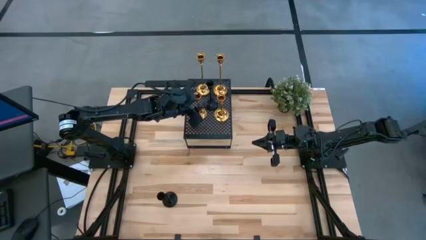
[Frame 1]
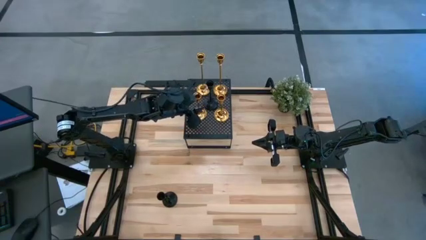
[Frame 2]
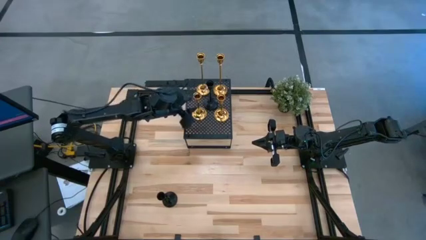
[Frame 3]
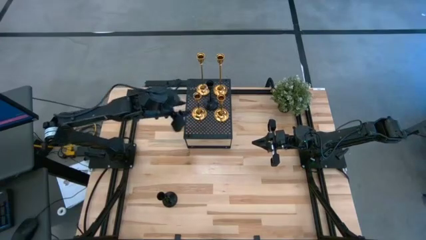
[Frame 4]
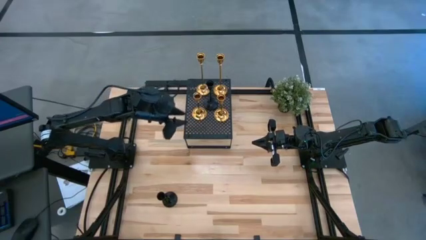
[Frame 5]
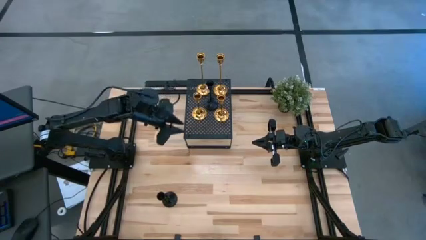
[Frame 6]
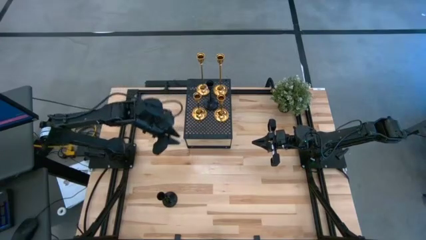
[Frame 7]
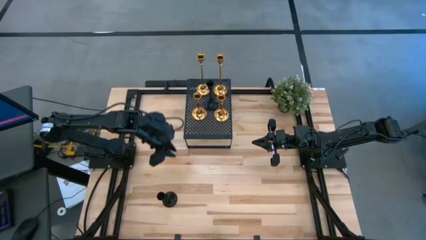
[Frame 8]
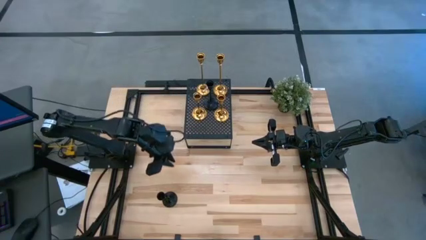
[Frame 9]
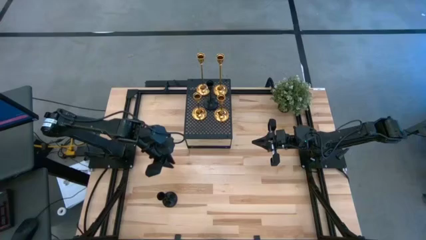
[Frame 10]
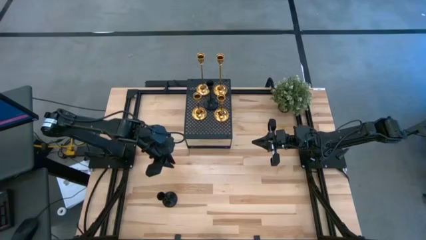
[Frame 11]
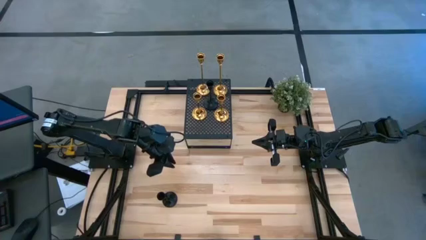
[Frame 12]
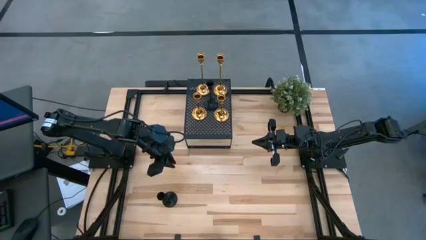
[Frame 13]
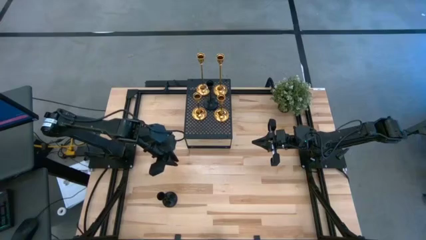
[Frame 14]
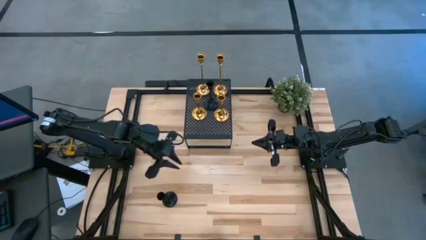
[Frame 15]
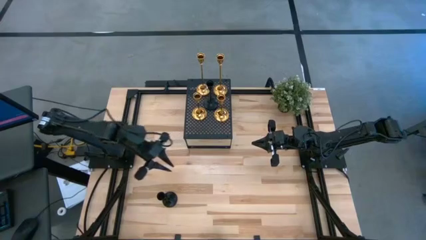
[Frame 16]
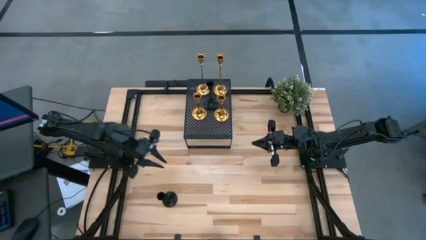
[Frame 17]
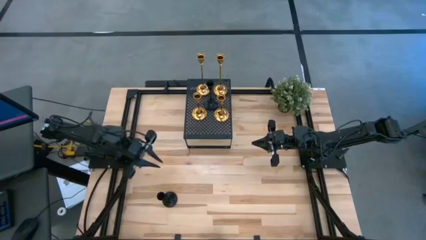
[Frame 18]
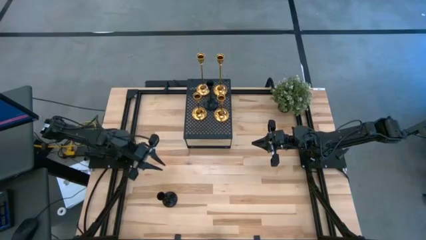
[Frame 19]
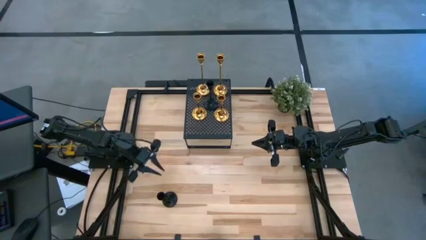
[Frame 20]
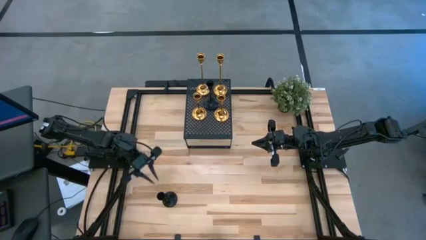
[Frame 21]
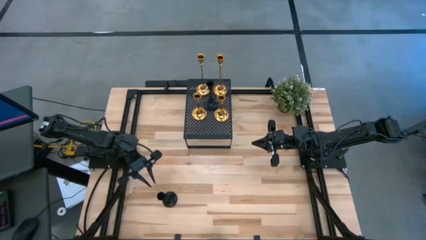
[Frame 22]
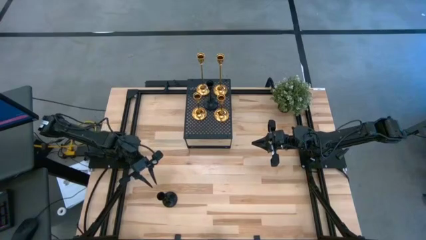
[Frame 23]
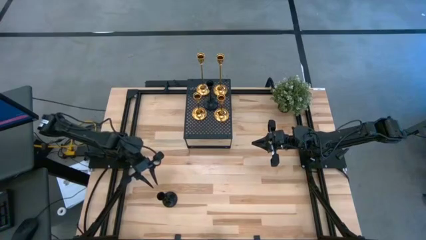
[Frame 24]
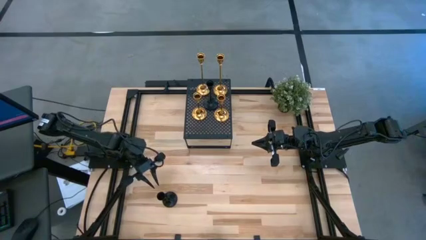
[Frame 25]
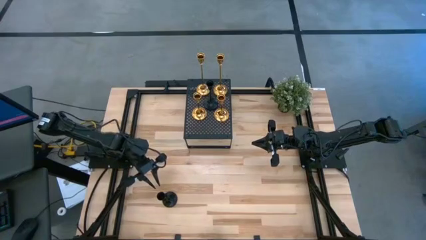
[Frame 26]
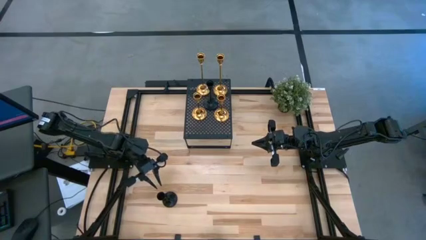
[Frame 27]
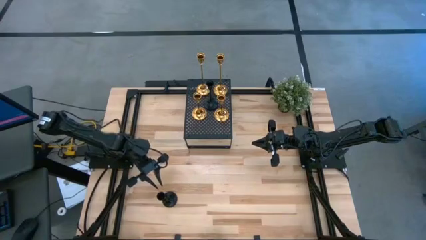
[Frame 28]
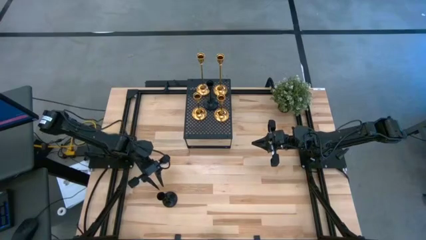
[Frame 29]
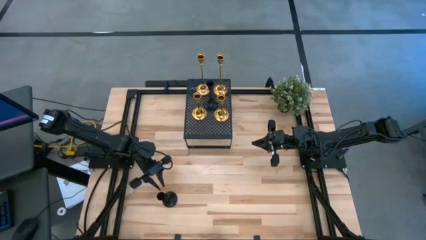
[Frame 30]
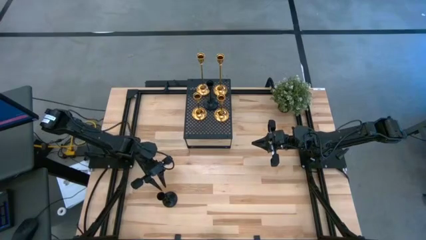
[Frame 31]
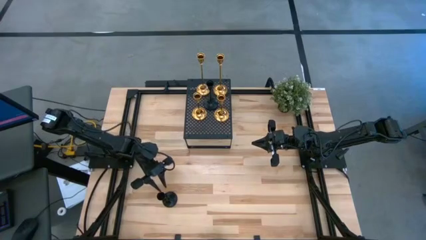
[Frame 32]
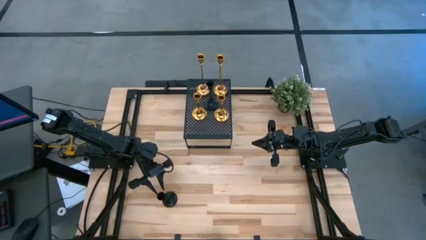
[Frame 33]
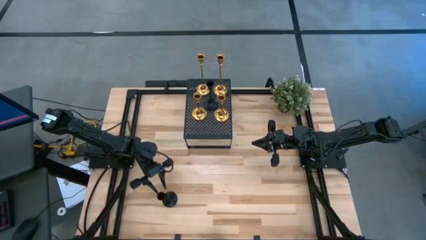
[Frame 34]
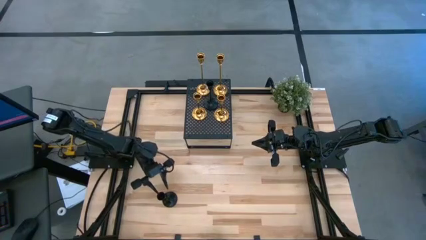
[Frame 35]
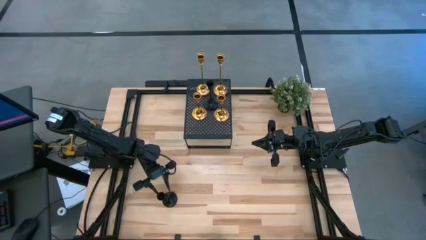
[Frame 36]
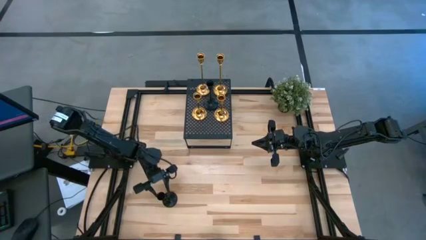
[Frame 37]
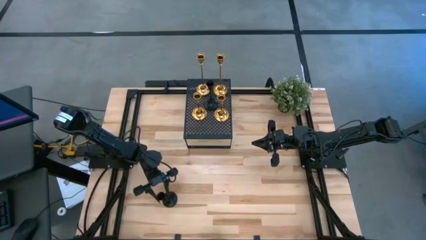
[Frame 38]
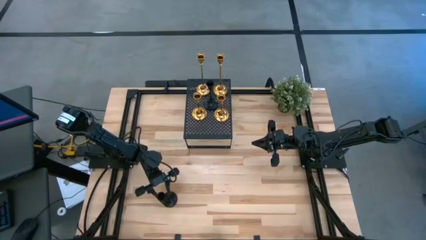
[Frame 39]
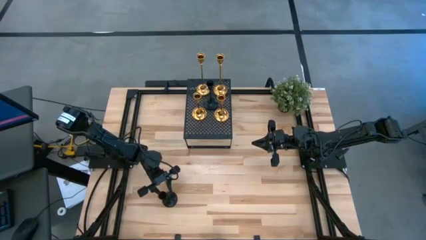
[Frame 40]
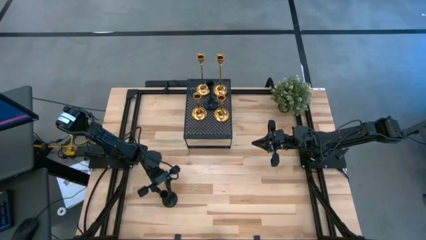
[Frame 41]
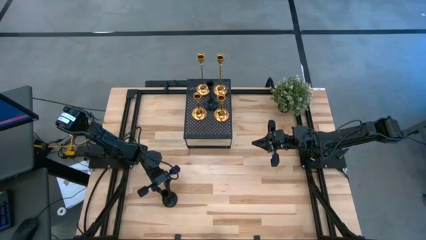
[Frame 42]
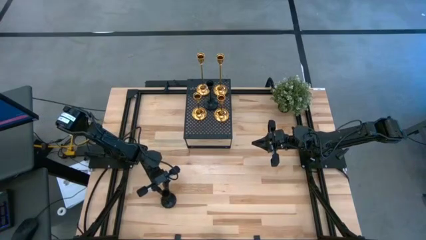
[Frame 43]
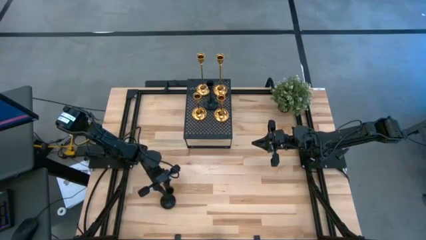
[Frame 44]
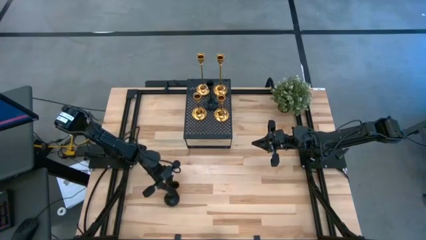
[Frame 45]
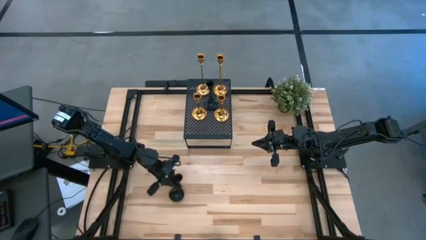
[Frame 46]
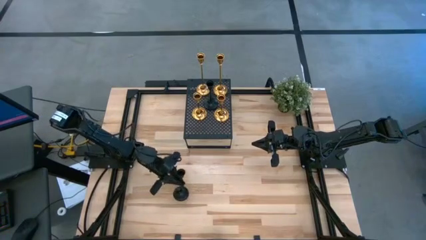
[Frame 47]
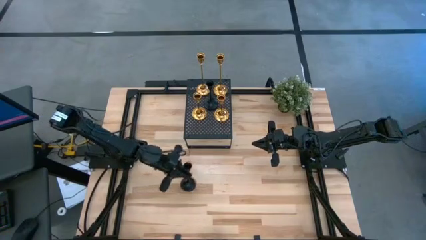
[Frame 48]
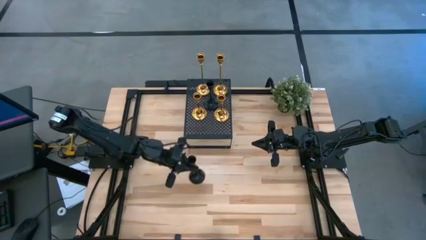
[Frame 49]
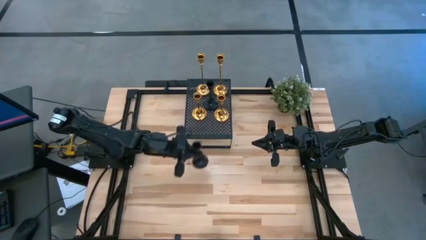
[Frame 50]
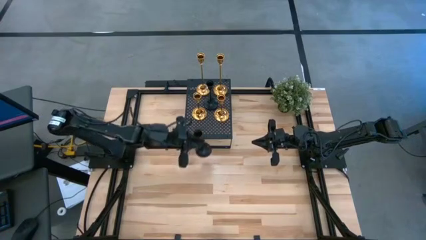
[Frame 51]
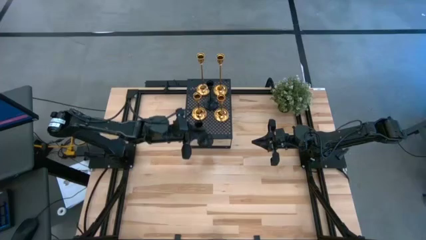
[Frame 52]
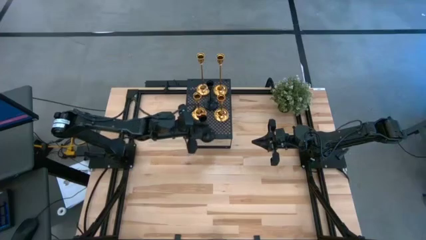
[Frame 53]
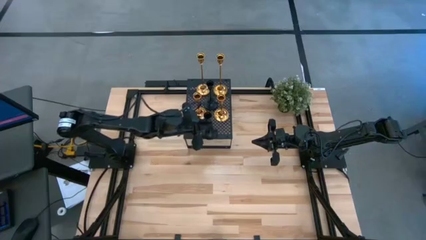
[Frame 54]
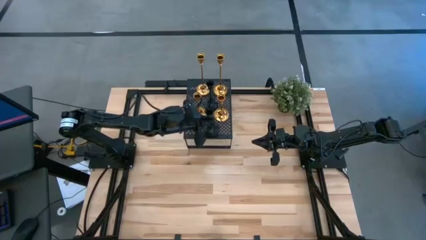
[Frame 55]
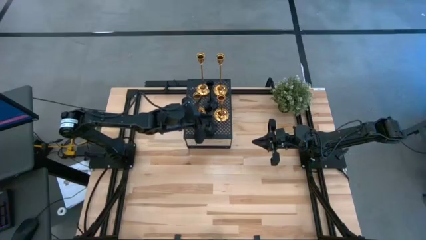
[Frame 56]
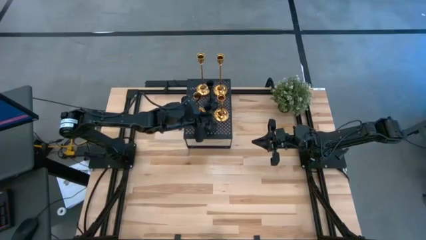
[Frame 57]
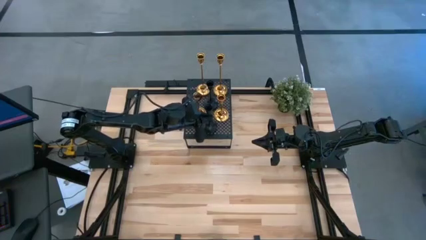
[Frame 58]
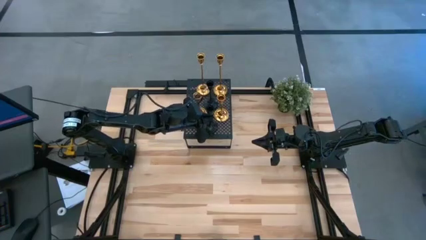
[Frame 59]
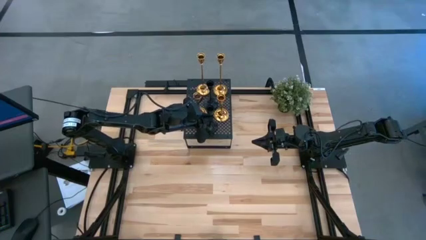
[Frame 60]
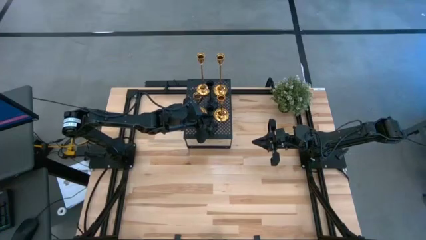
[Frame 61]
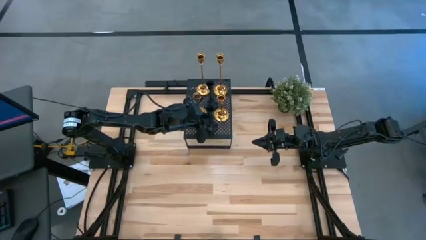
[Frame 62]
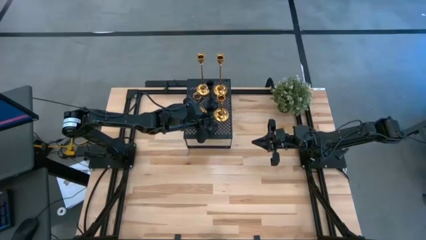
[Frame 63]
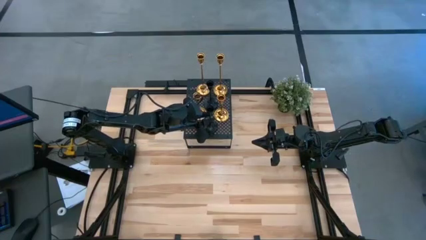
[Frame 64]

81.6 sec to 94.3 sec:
Task: Pick & Place candle stick holders
Put the black candle holder on the shelf
